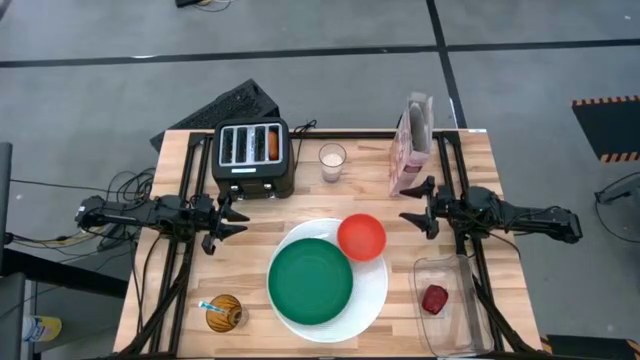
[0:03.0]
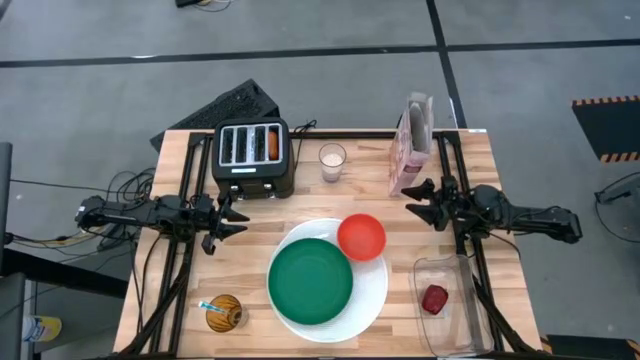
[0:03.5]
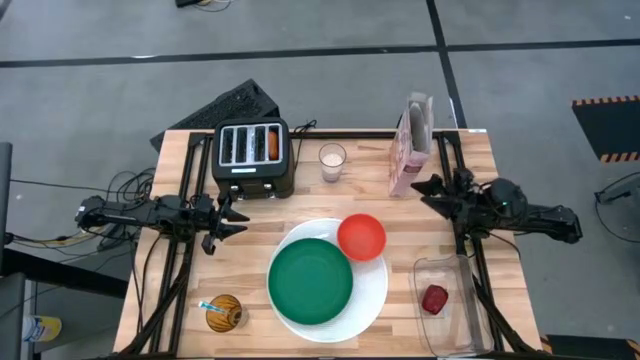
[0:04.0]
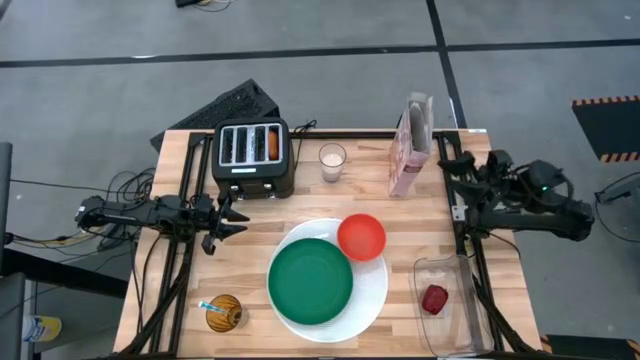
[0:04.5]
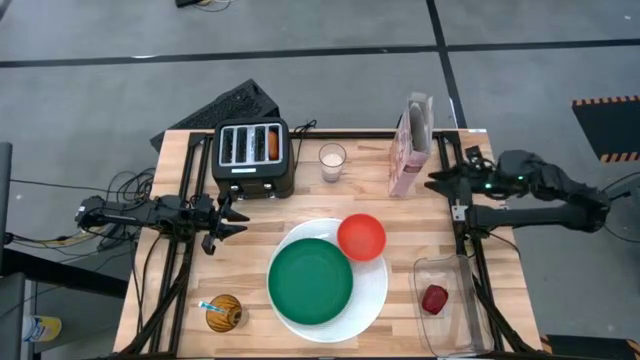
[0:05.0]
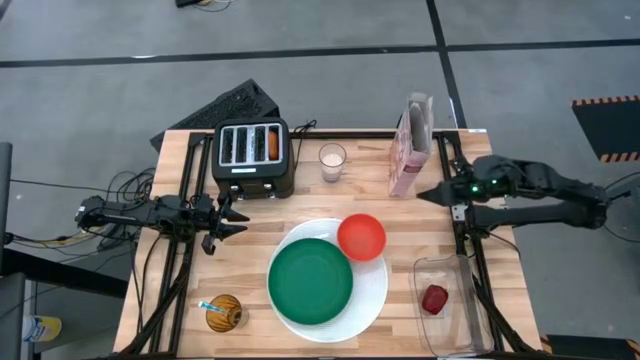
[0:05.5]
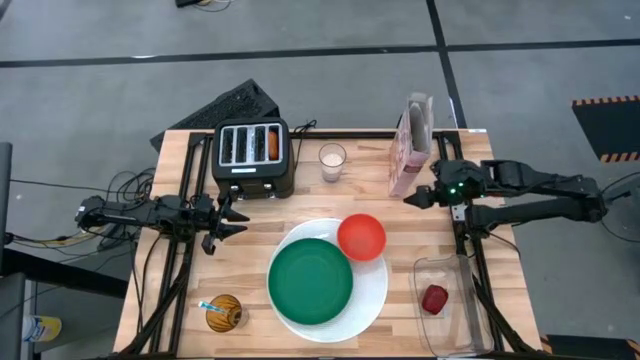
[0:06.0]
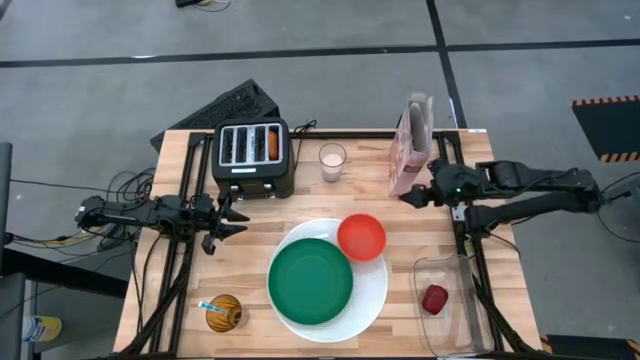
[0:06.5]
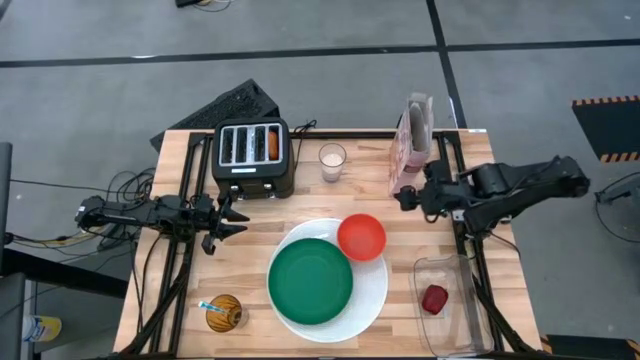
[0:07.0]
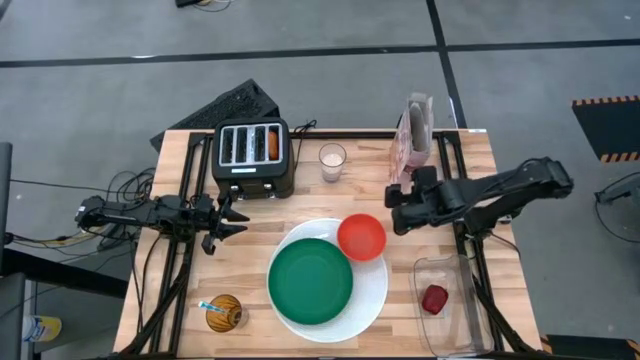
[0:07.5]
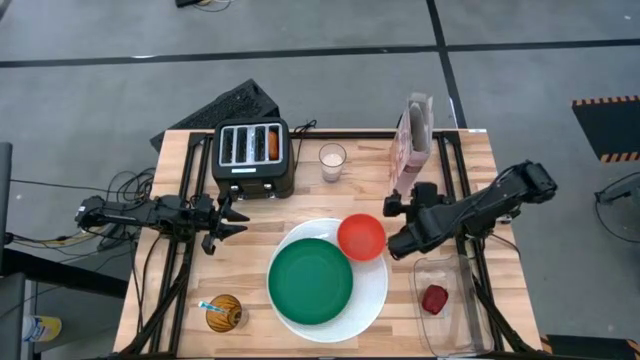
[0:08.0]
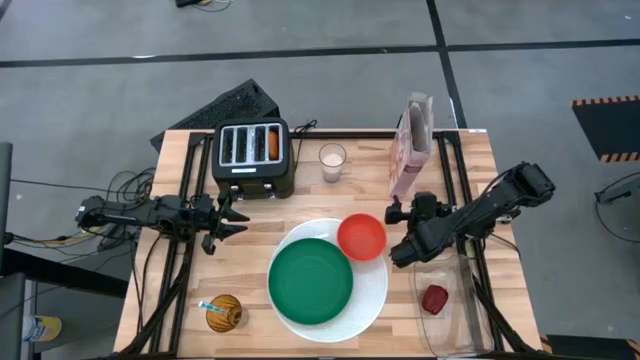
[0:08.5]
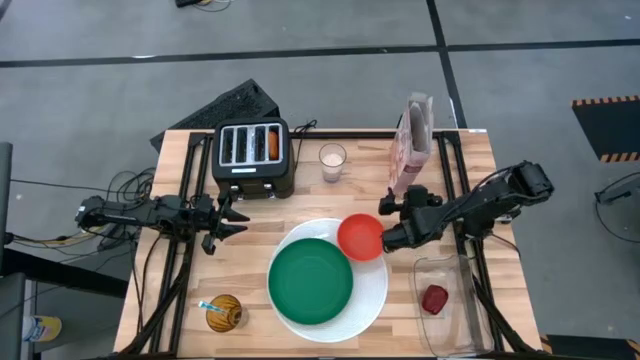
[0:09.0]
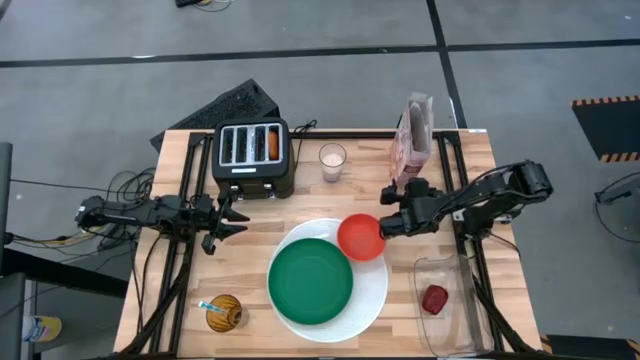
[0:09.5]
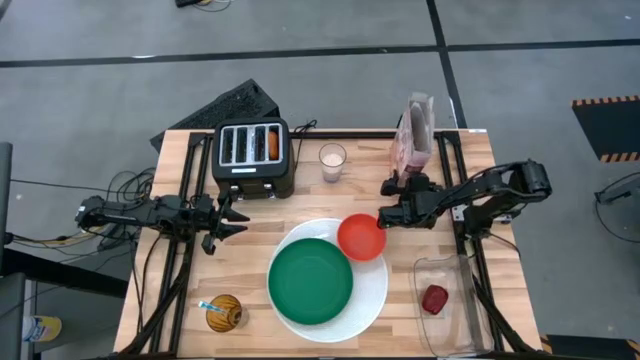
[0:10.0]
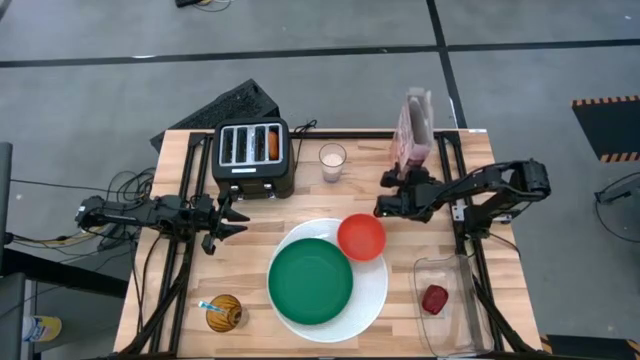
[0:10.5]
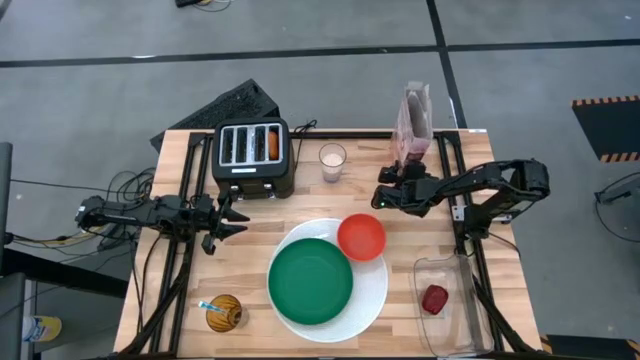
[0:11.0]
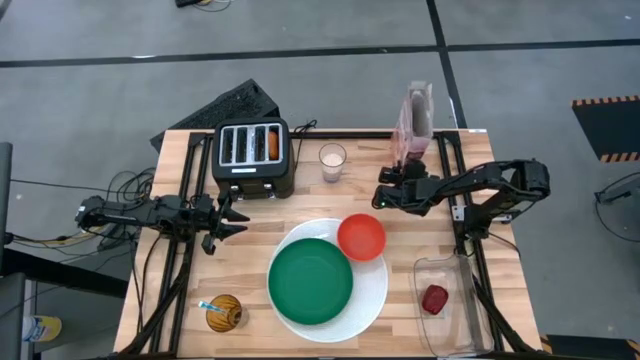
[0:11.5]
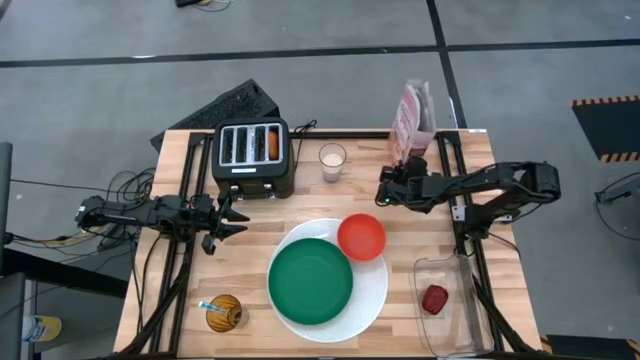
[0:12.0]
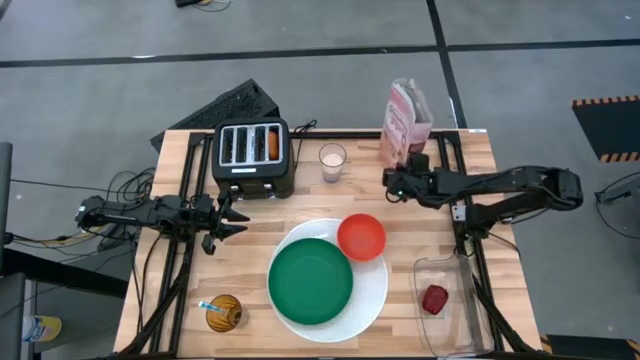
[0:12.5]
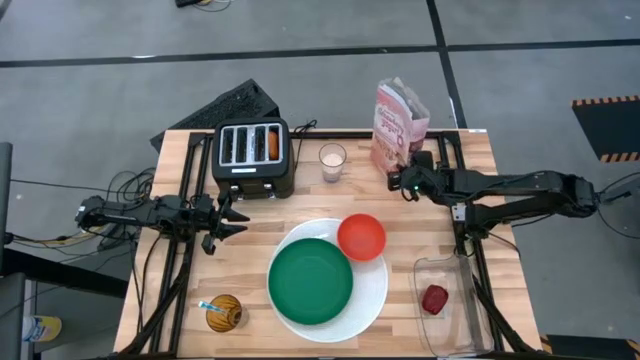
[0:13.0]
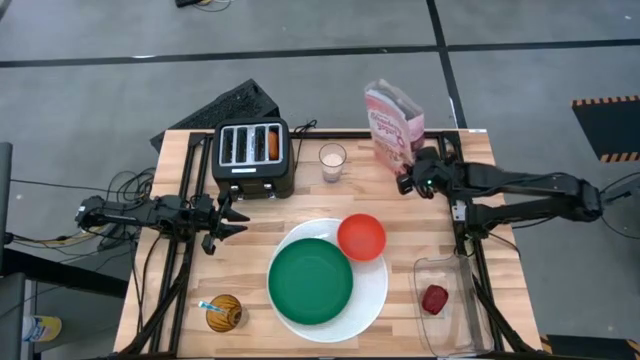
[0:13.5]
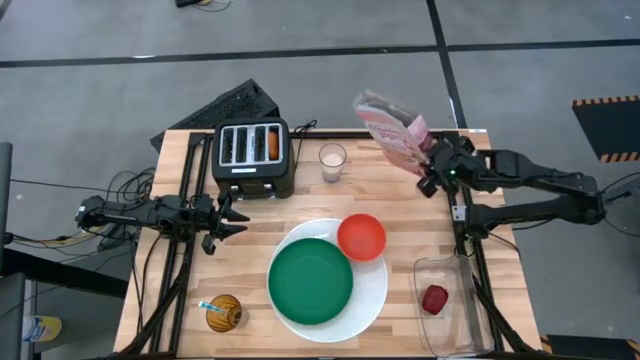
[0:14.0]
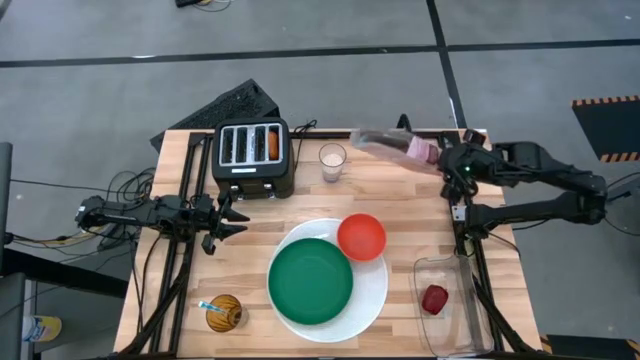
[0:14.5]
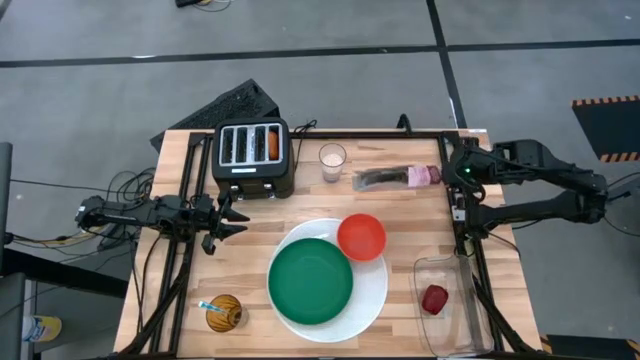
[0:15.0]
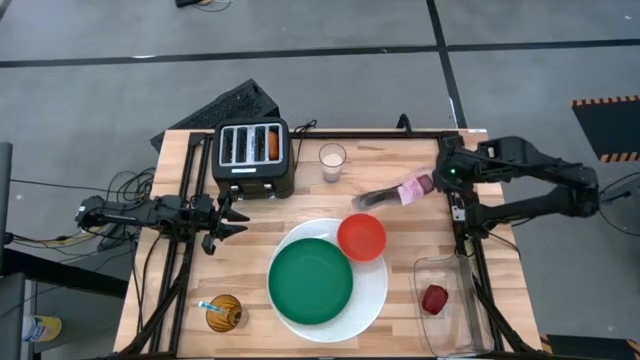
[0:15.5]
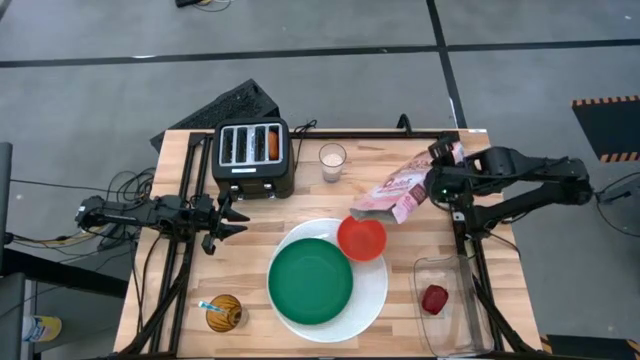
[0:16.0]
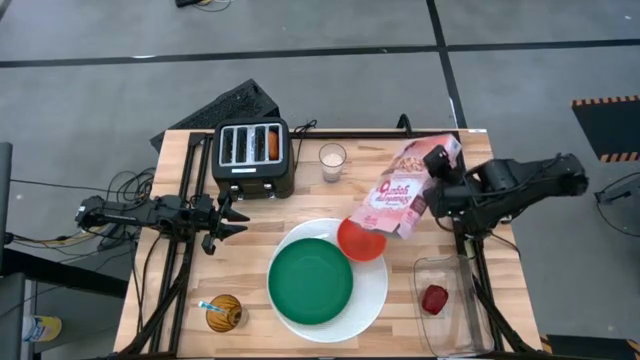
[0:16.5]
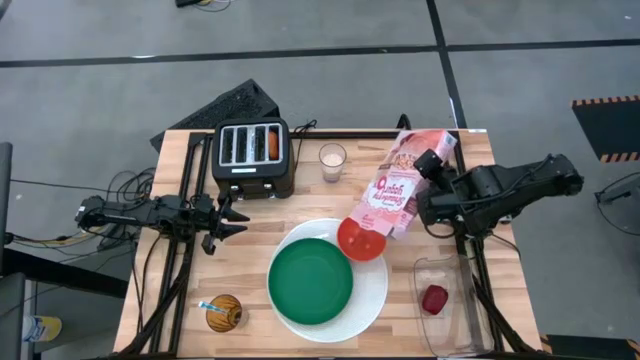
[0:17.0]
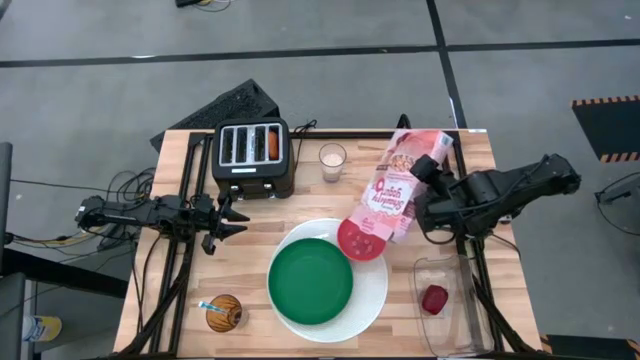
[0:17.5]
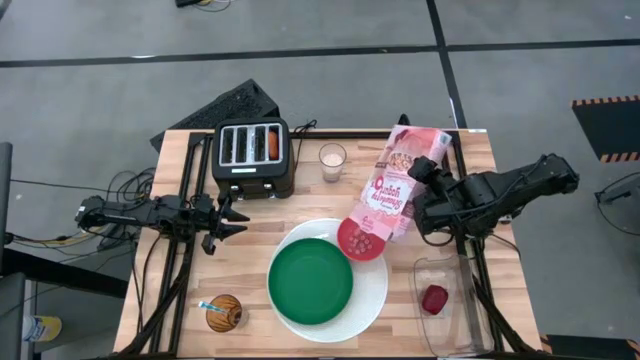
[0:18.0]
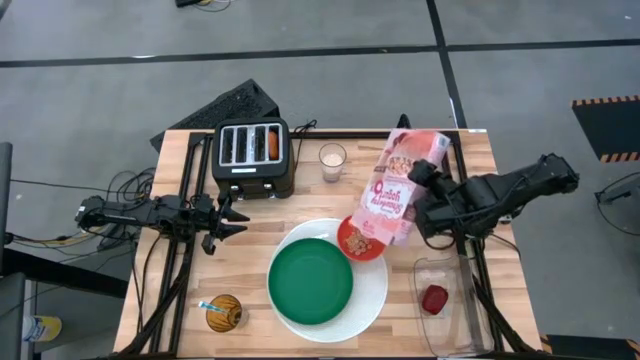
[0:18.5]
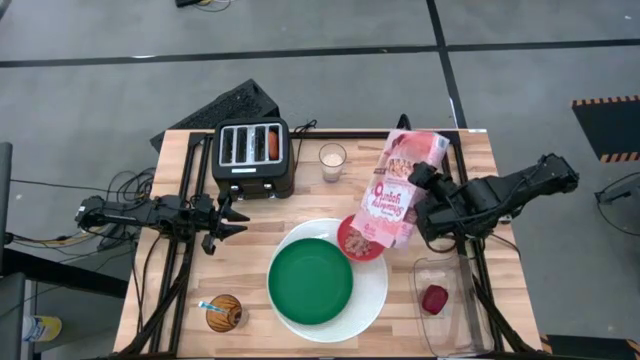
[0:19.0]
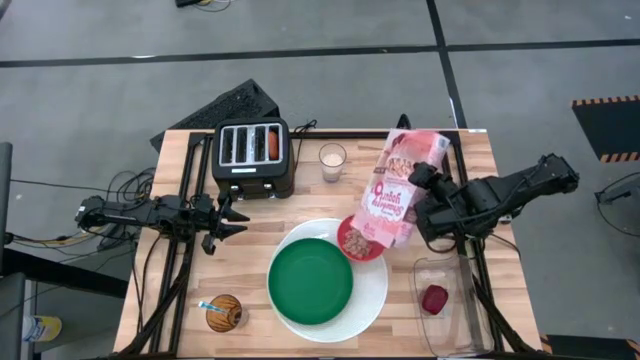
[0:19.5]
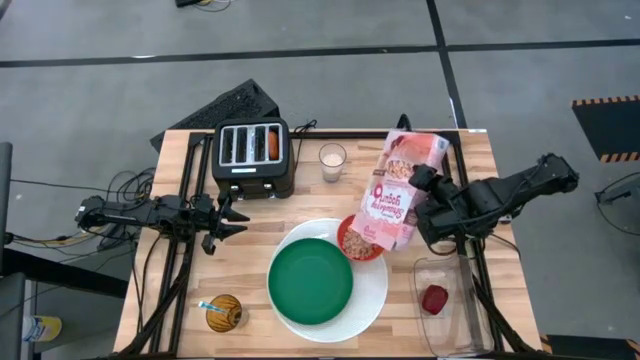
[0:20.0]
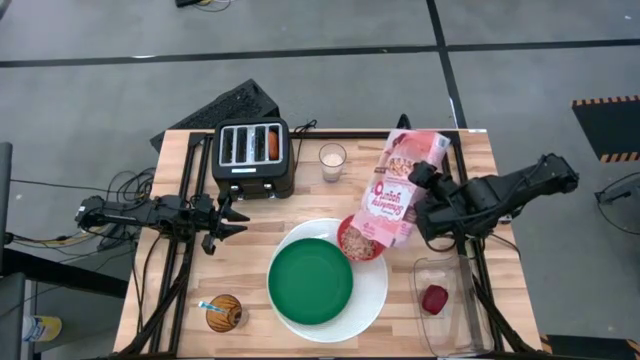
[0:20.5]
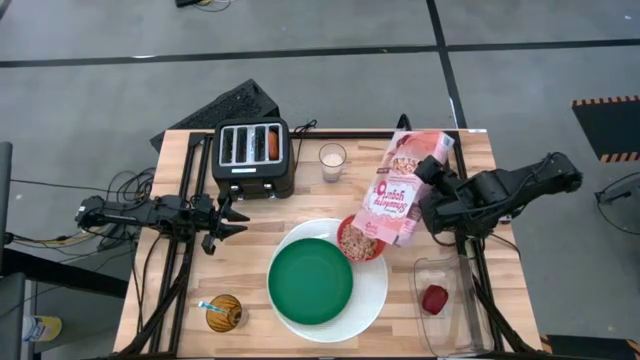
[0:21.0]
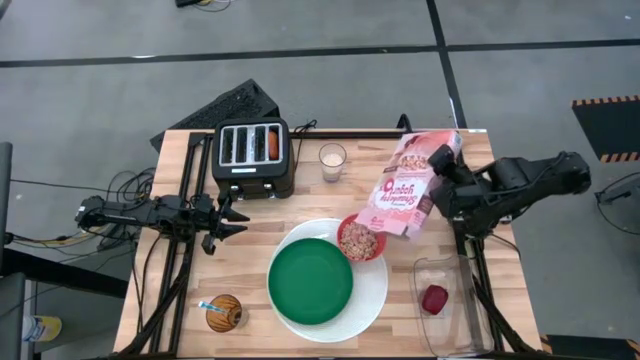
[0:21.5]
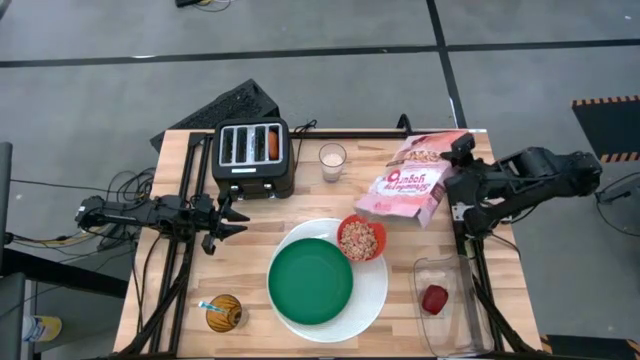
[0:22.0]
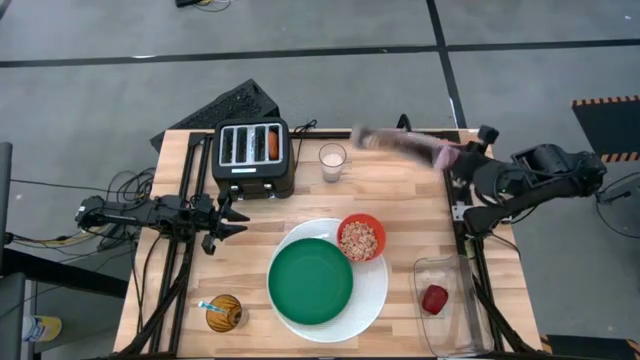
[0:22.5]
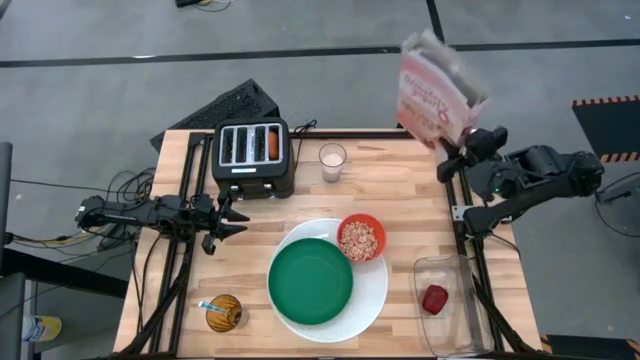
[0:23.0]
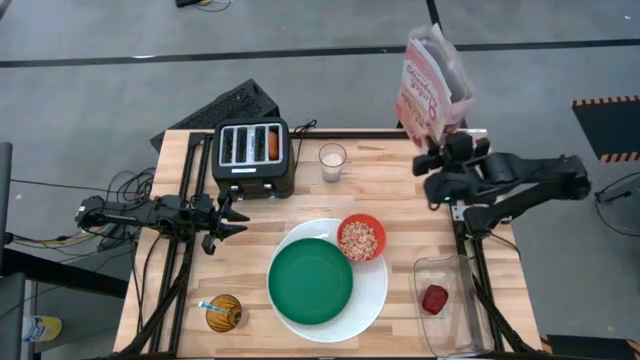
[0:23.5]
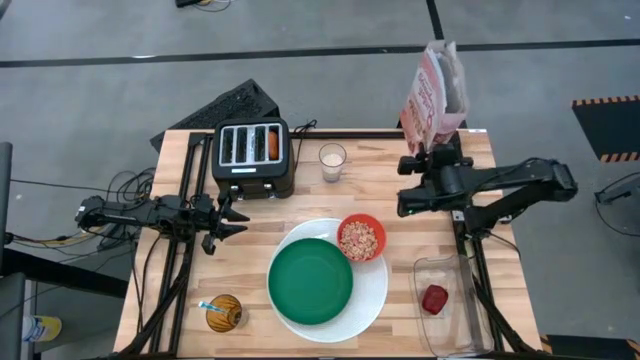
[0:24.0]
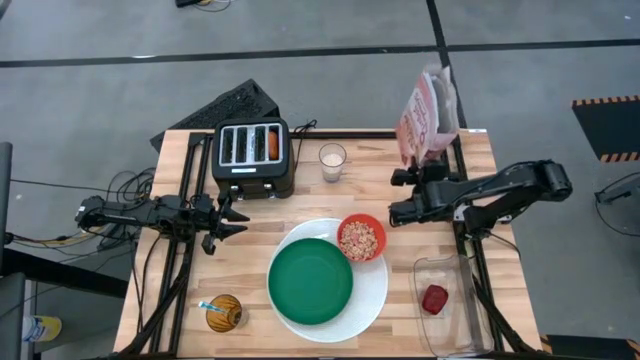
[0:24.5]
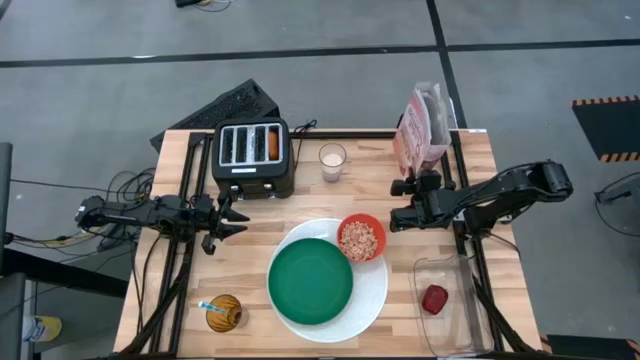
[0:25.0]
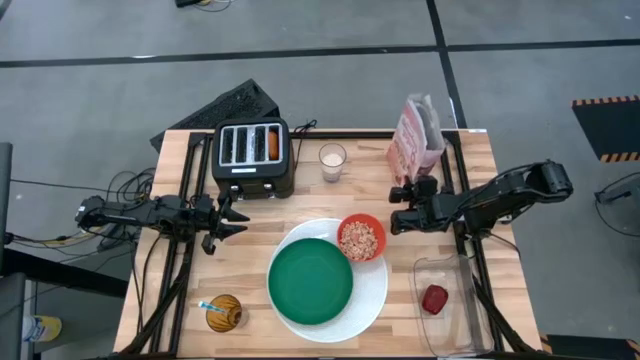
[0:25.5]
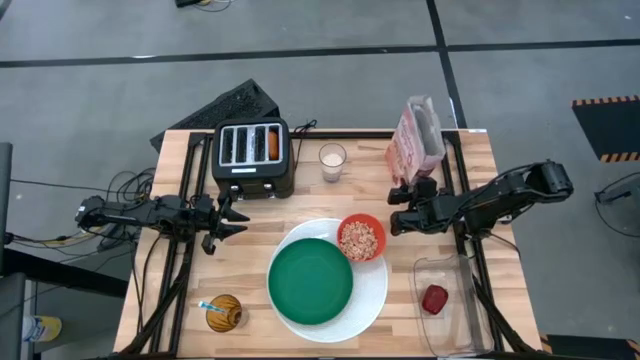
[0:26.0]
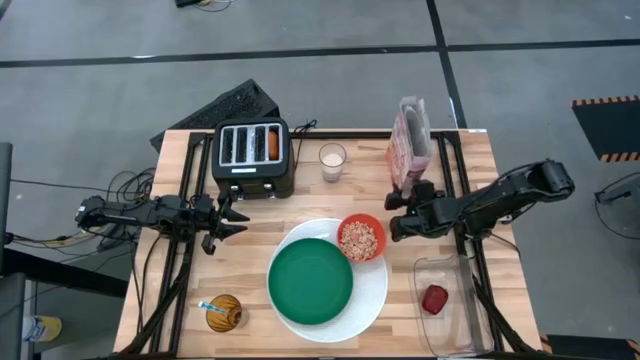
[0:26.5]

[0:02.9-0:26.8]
Task: Arrange a breakfast setting
Pour the cereal into the orange bowl
